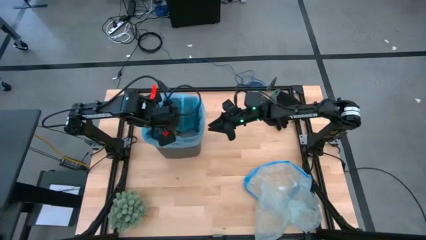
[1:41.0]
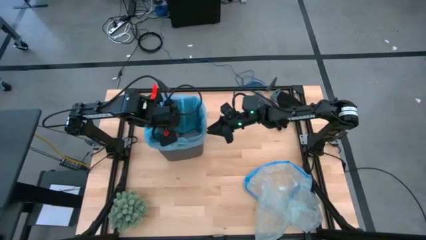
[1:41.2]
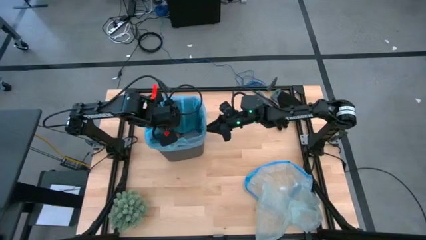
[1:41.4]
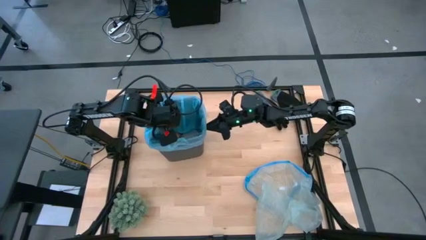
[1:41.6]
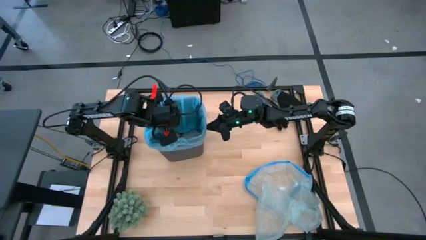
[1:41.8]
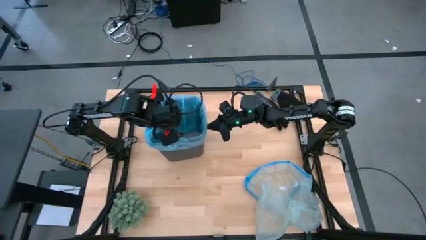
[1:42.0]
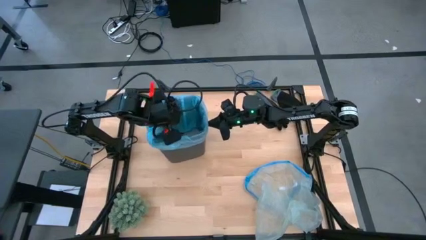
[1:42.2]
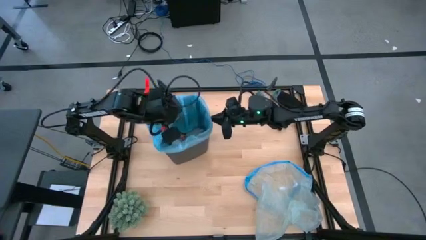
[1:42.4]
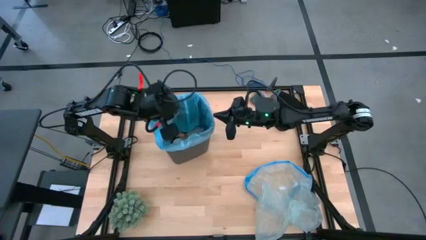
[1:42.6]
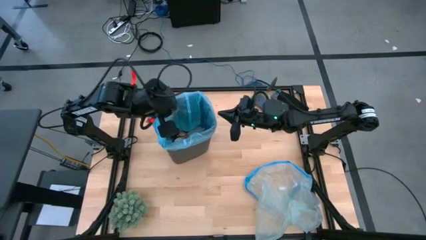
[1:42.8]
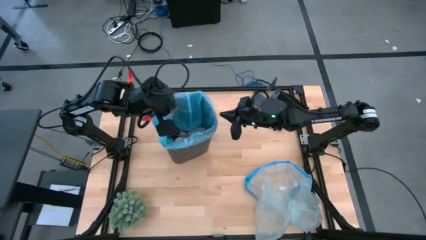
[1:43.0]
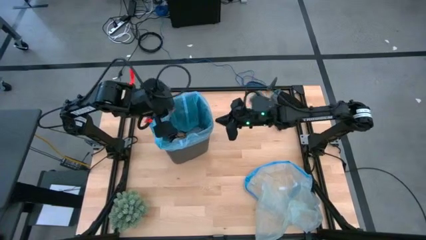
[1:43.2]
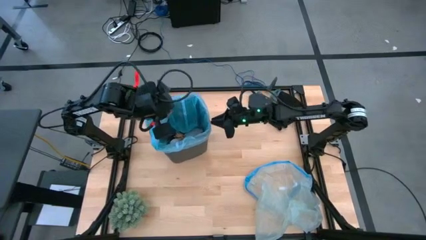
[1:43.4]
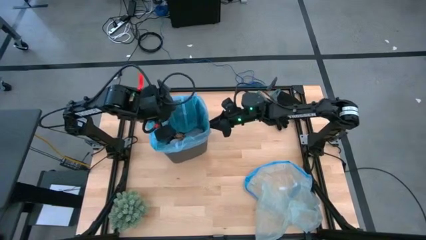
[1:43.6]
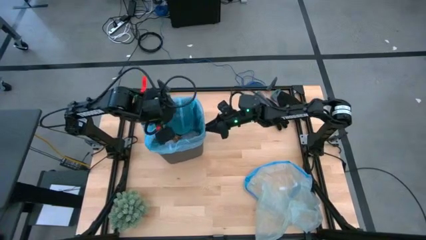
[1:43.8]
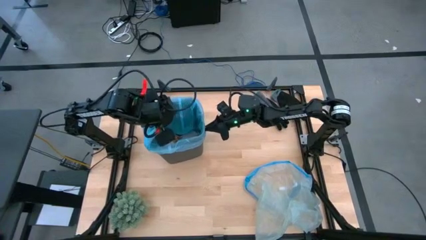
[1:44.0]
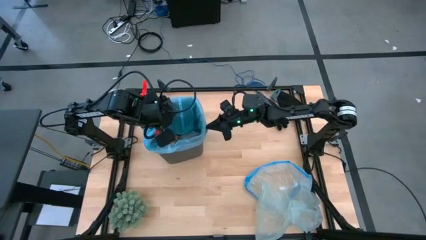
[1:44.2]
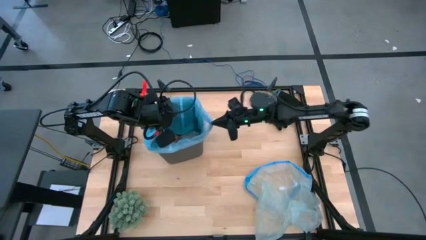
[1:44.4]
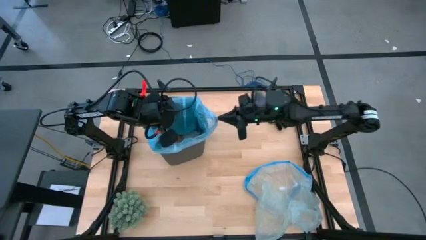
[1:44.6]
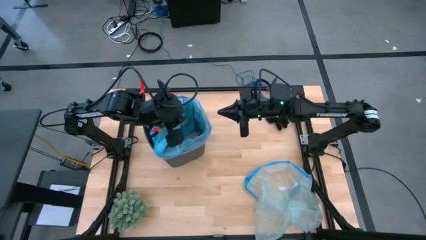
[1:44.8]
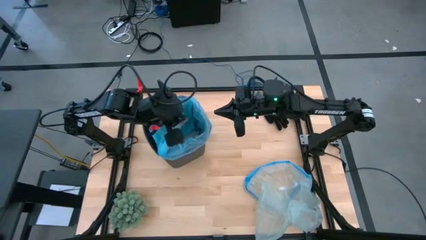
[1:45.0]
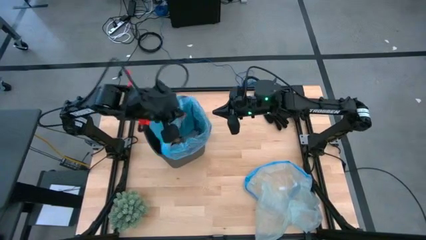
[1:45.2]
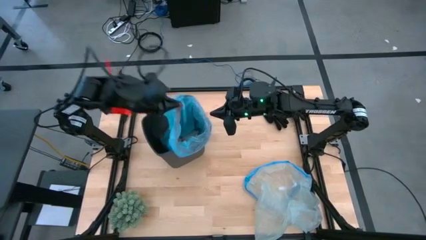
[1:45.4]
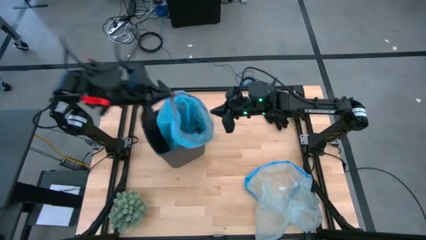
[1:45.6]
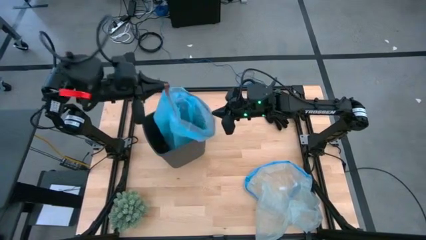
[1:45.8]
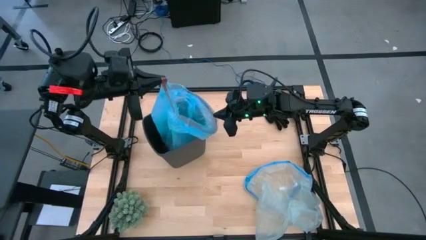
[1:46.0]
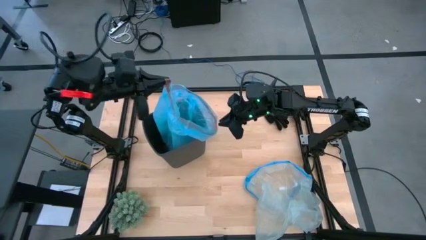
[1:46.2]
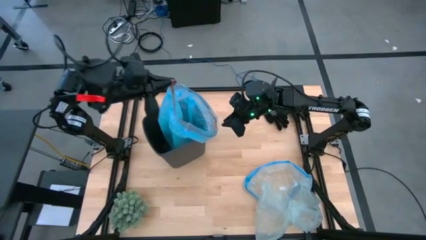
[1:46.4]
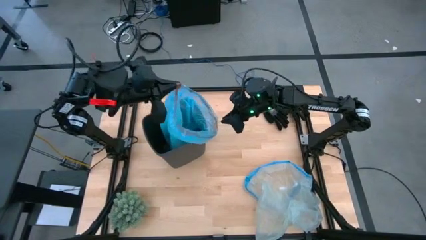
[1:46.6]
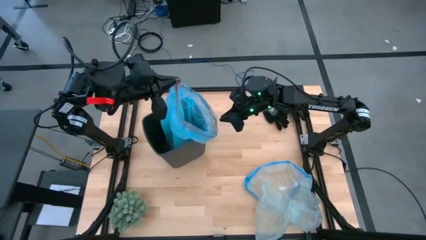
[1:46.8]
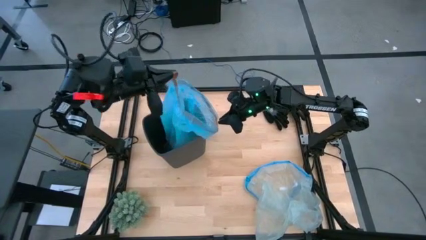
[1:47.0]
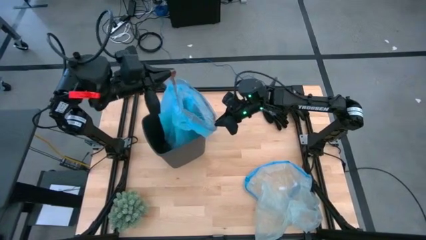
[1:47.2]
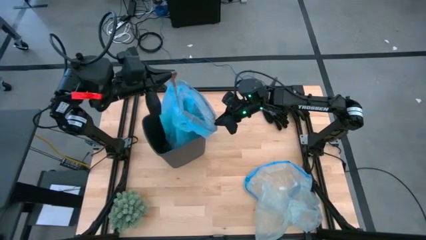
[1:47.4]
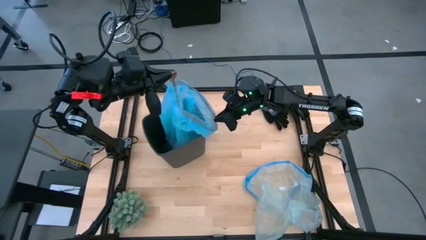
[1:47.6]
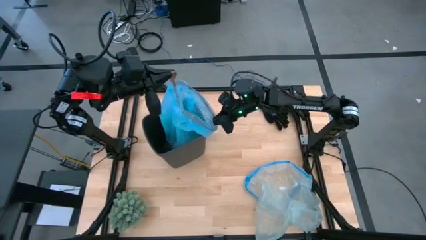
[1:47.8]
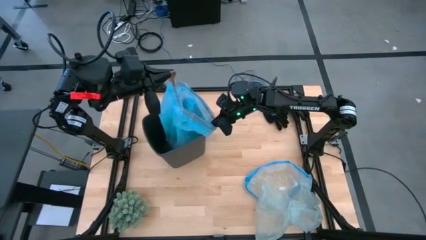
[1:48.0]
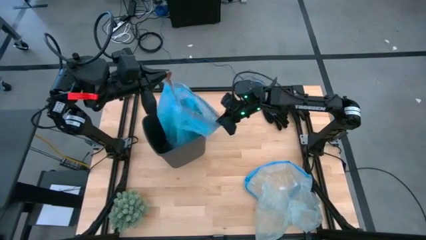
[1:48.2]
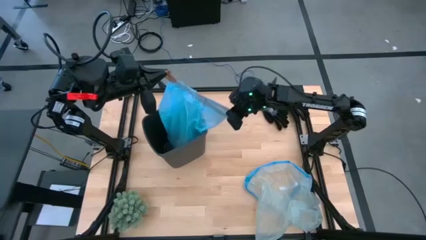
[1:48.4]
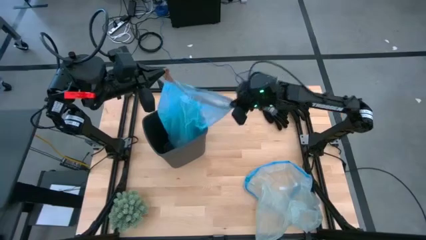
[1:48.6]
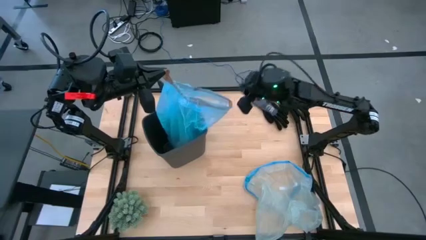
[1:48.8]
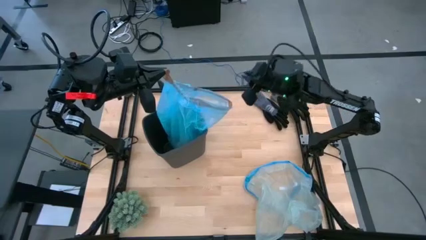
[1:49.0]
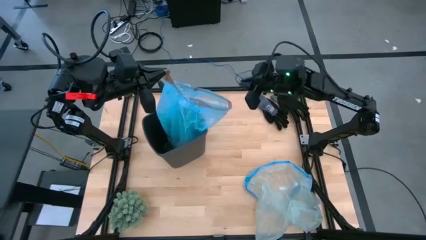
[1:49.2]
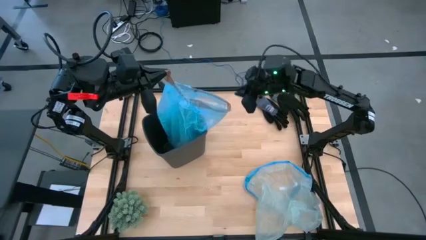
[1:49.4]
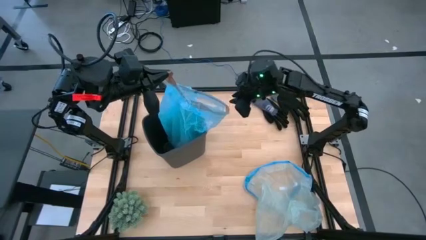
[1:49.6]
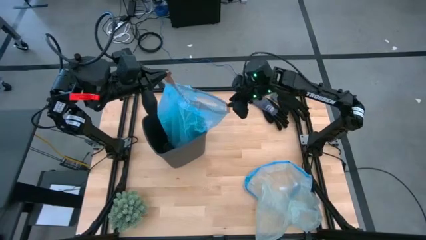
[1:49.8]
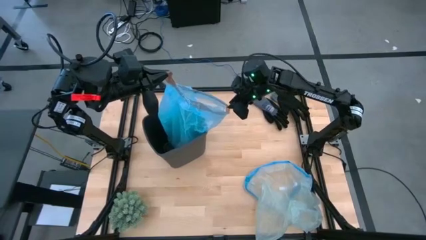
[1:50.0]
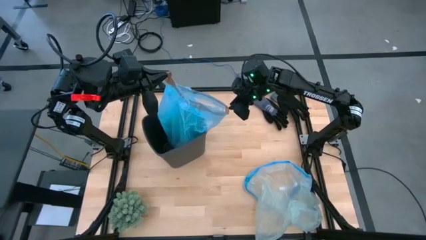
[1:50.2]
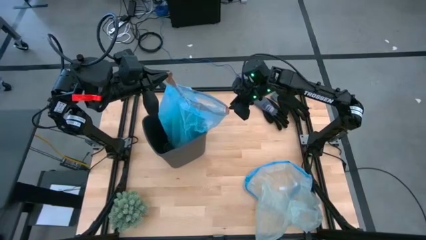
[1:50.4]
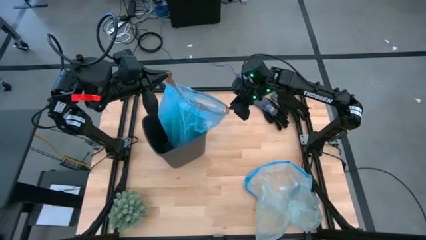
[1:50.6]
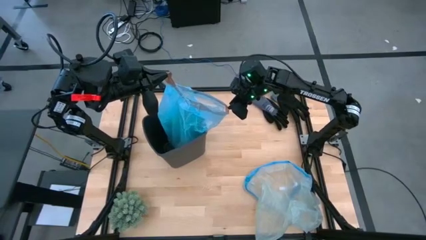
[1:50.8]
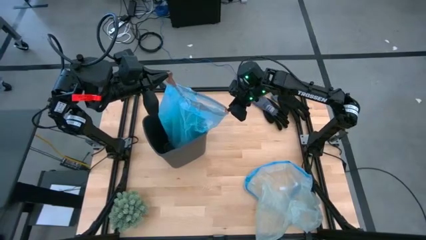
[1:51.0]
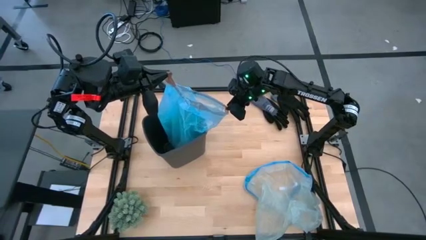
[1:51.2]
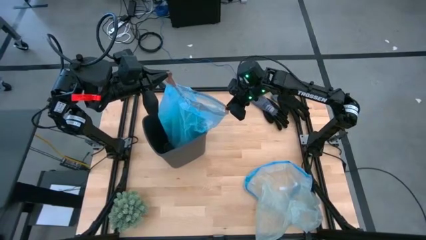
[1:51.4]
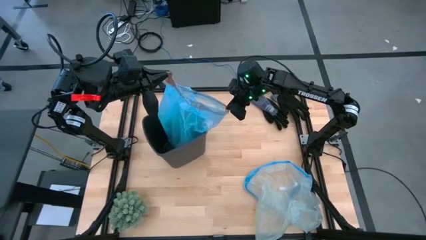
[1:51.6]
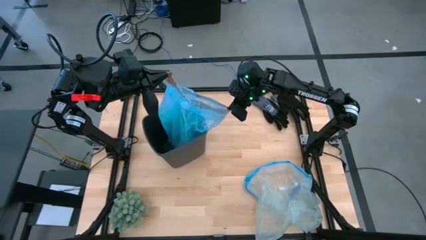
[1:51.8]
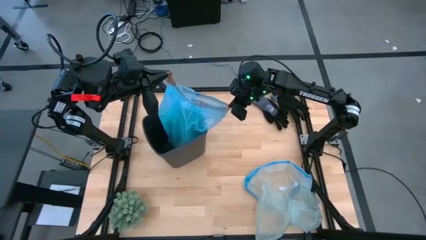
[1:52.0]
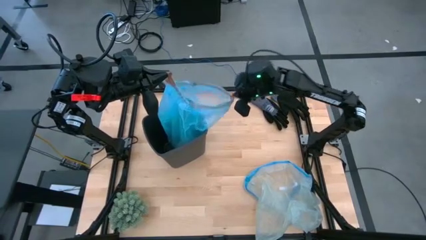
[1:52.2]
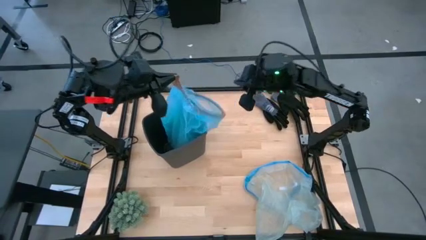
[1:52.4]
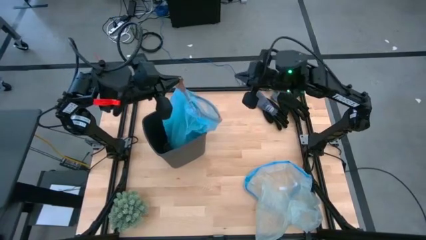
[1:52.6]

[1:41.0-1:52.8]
Task: place trash/remove bag and relplace
Remove the trash bag from the bin

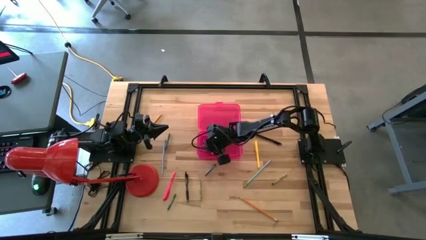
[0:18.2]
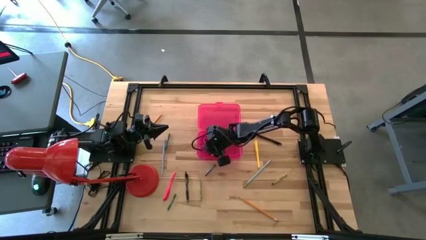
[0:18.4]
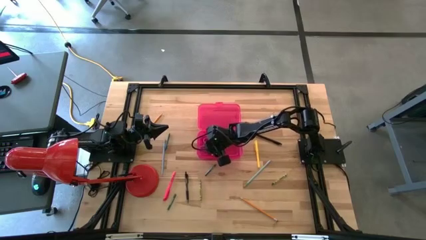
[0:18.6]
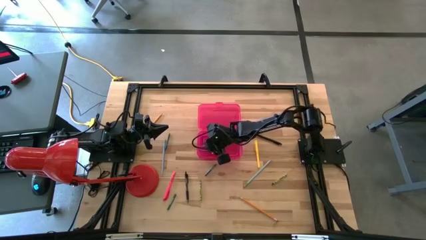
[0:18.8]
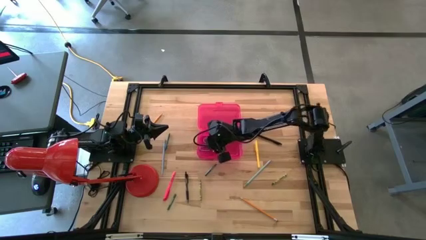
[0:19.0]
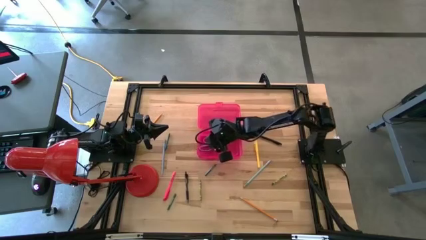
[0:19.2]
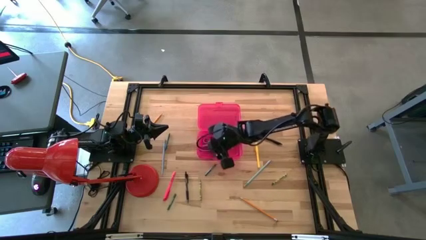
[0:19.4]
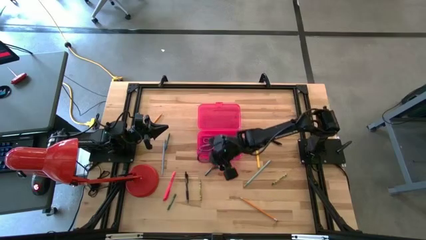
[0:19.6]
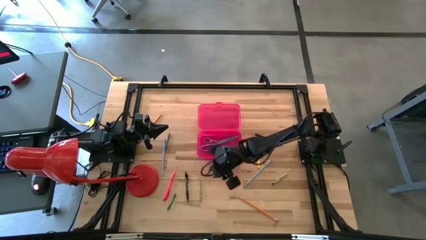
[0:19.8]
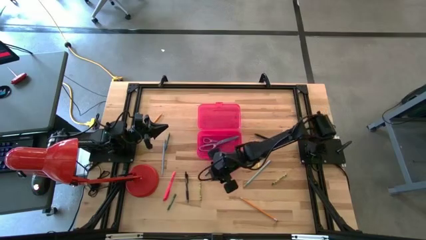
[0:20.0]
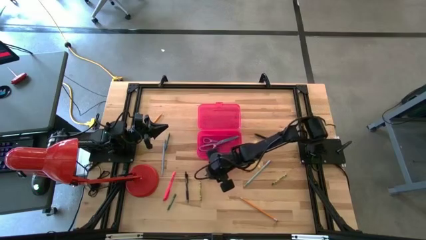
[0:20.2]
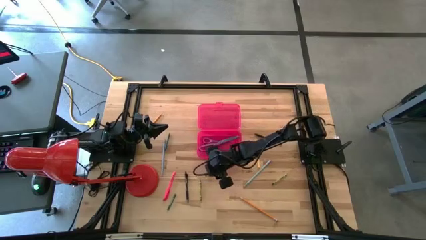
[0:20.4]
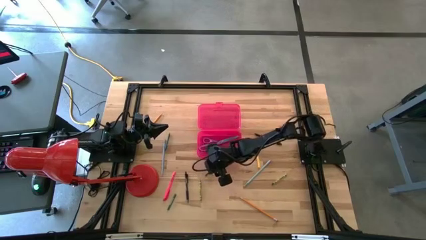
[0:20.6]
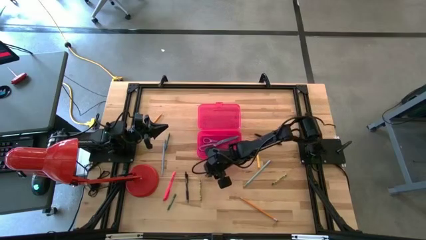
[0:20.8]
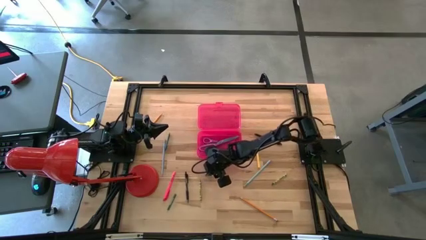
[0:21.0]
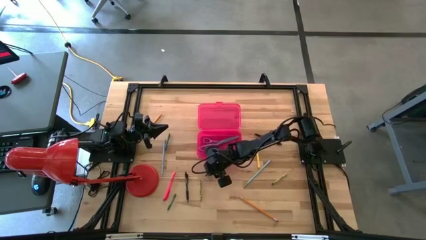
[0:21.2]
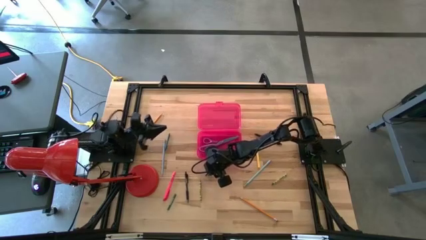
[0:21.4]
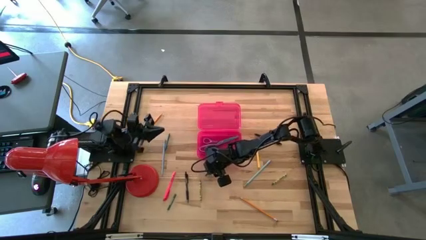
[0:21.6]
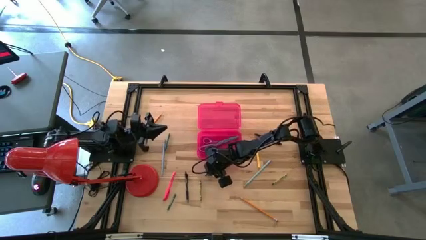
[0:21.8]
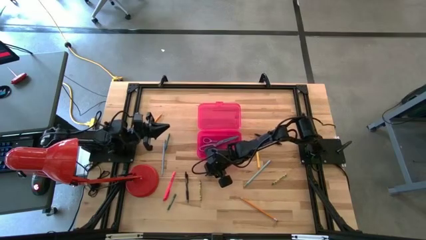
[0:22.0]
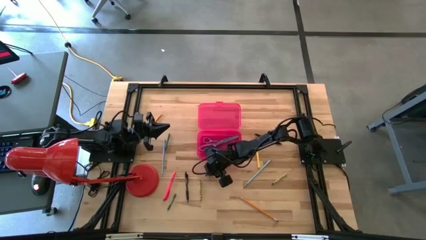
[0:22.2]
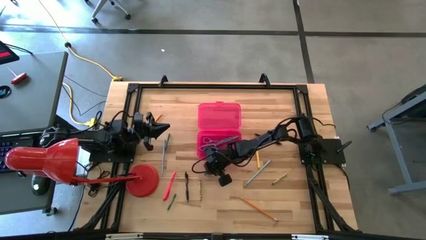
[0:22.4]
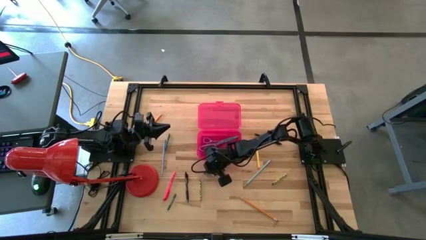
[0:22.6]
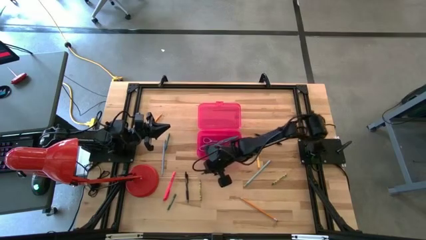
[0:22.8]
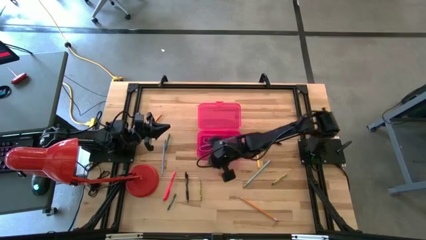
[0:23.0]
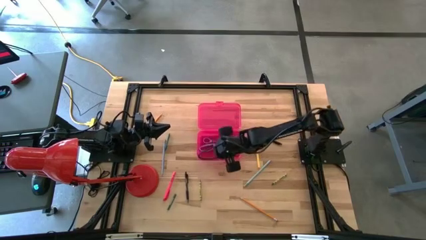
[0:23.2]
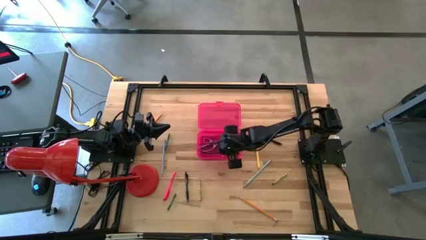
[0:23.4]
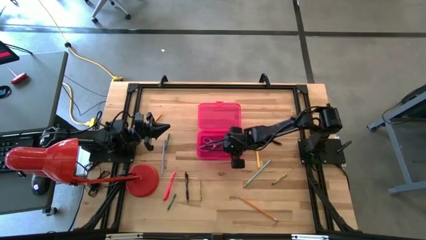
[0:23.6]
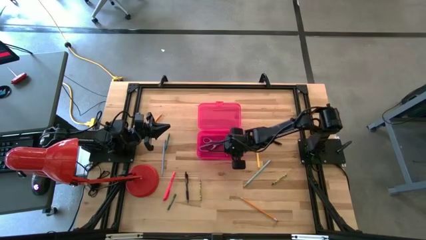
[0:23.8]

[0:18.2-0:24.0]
Task: Pick & place school supplies into a supply box
Put the middle right dark green crayon into the pink supply box
